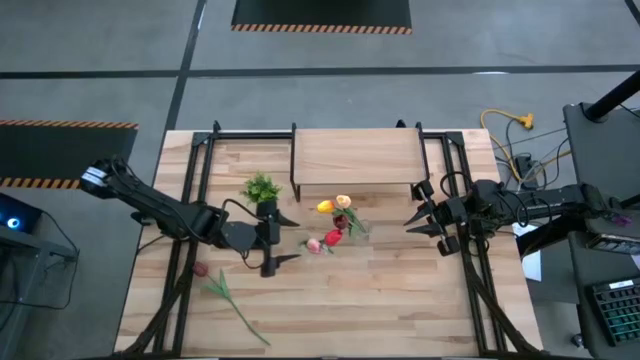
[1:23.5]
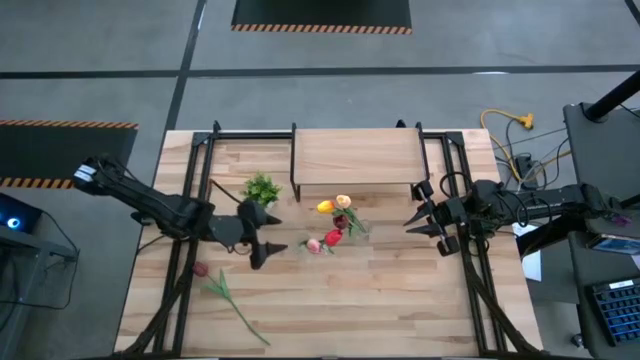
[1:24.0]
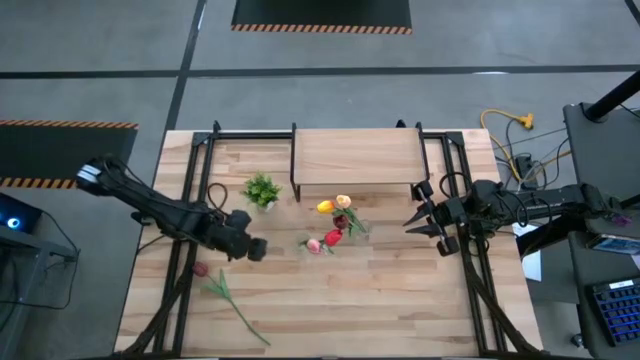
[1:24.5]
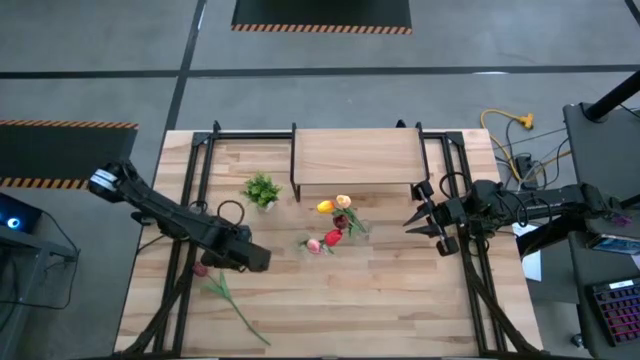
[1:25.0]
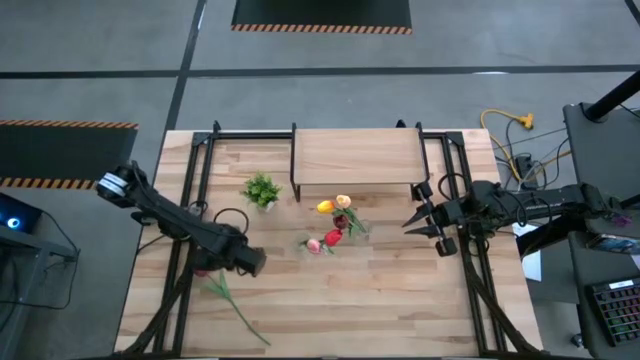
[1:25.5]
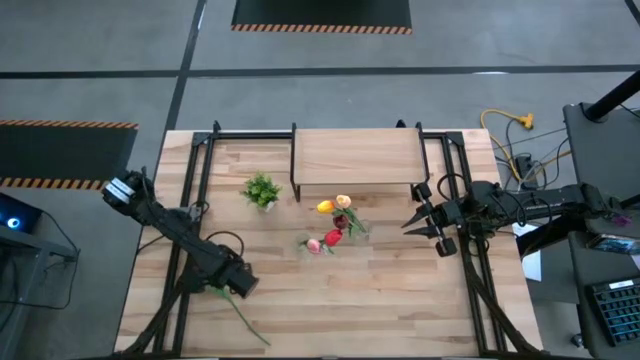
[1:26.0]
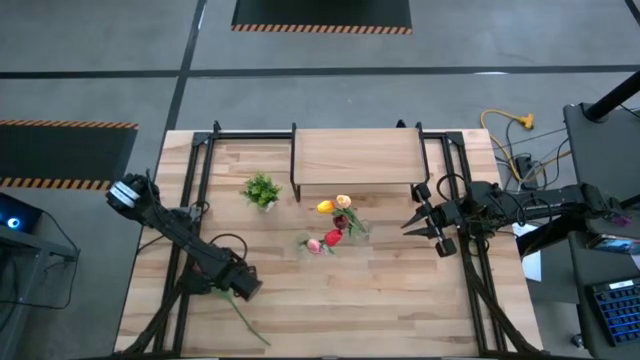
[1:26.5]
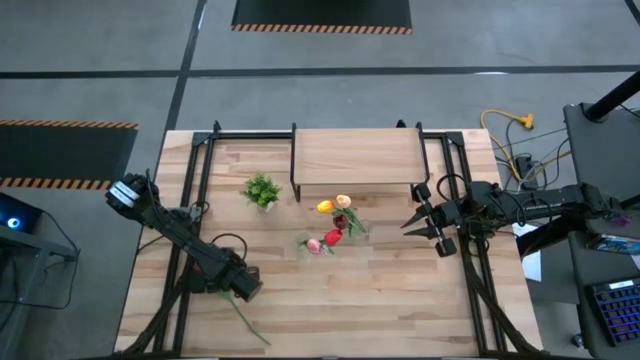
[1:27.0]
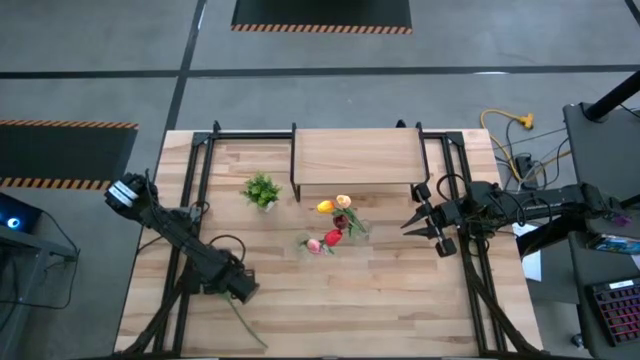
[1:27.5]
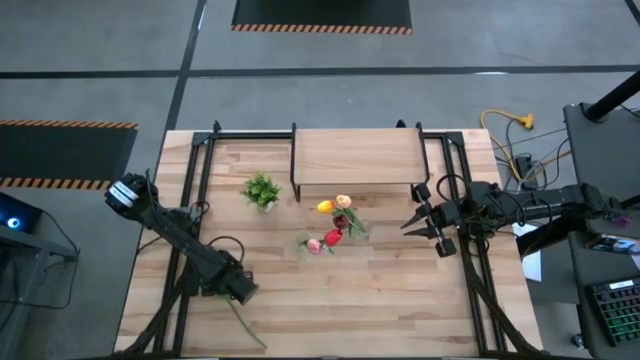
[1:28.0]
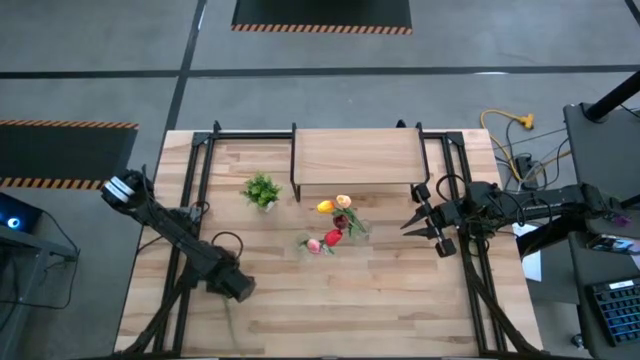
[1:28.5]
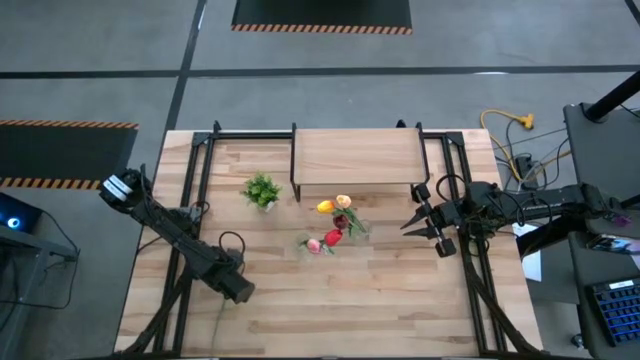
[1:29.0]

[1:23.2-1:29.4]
Task: Pick and place flowers into a vace then onto a shelf
Put the dark red tulip into the left transparent vase

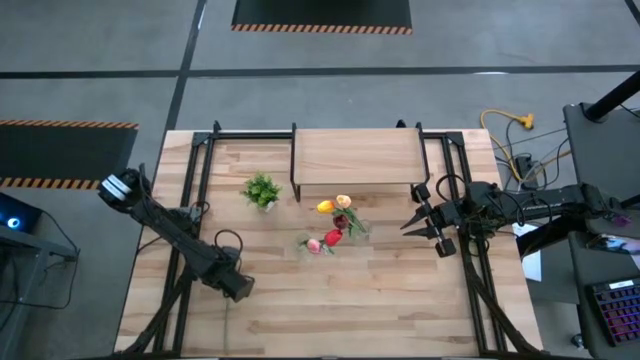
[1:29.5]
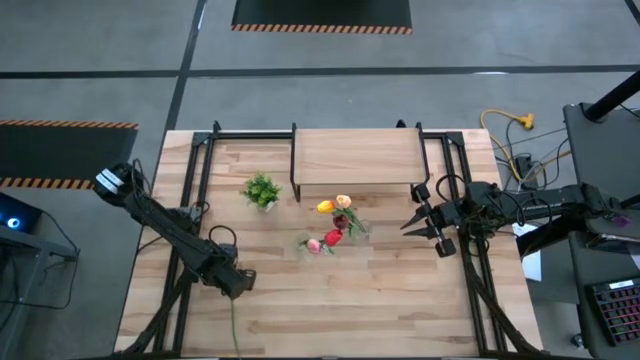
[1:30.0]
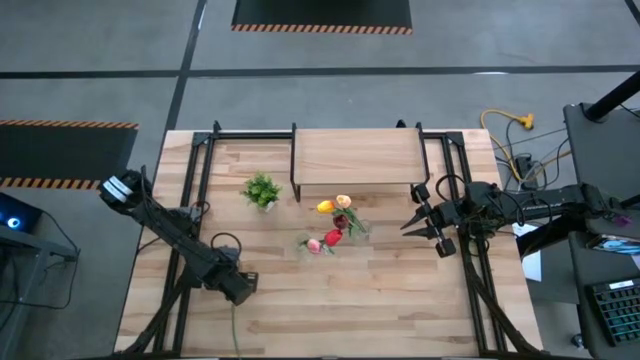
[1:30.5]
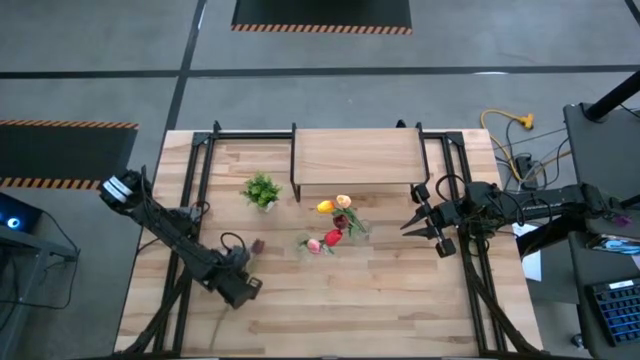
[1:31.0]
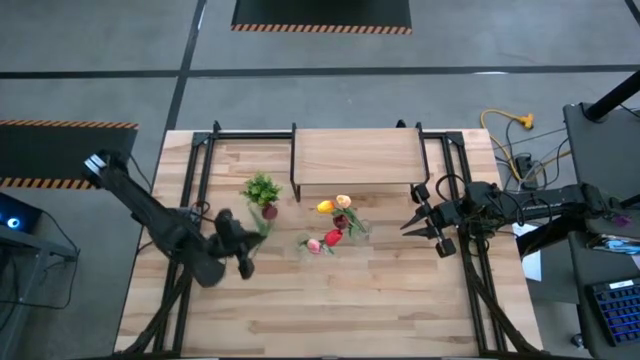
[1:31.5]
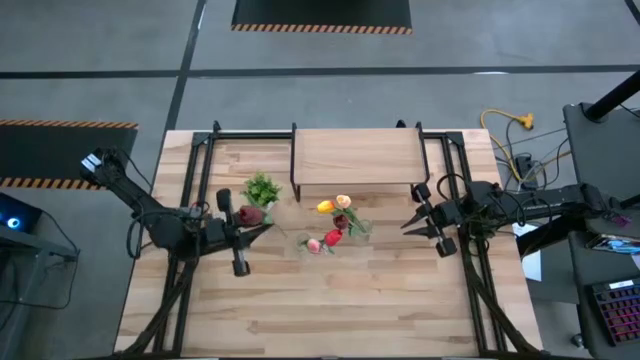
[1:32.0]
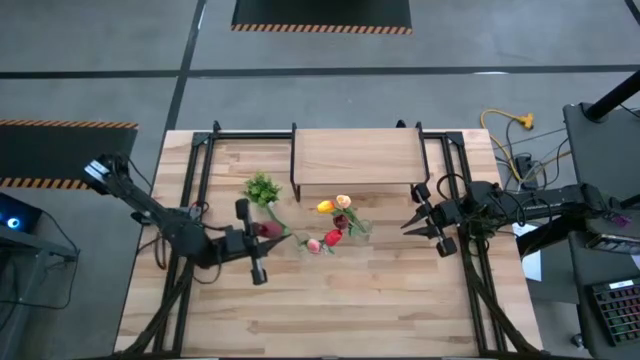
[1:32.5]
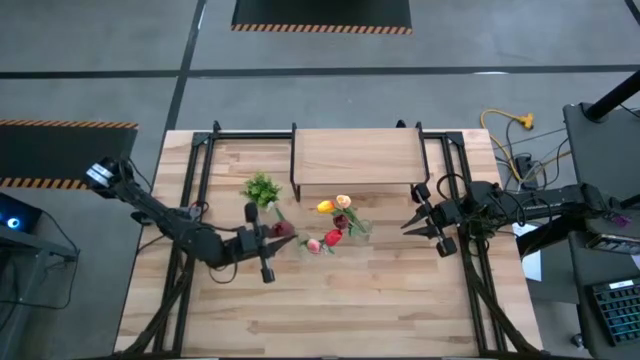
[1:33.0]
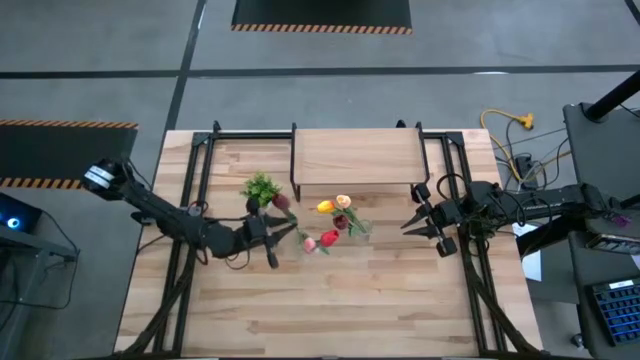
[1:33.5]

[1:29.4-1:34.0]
Put the dark red tulip into the left transparent vase

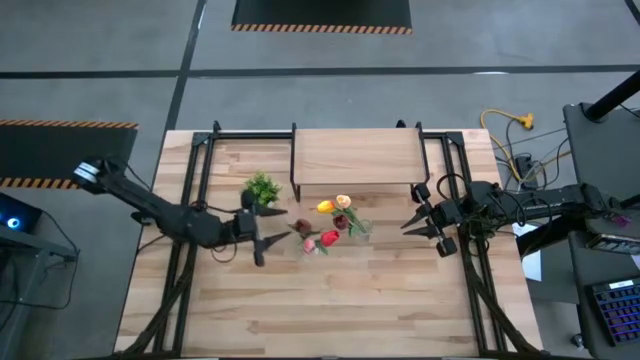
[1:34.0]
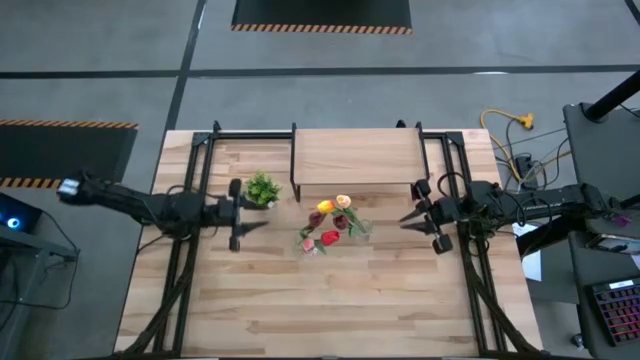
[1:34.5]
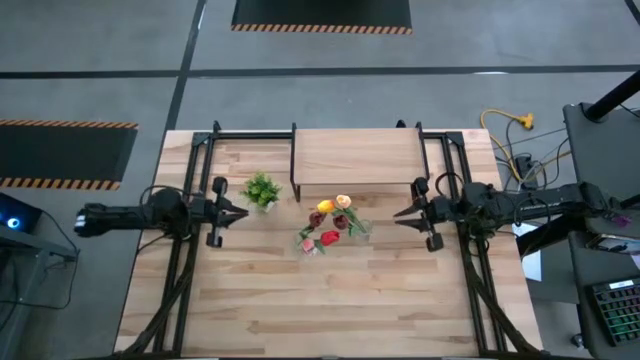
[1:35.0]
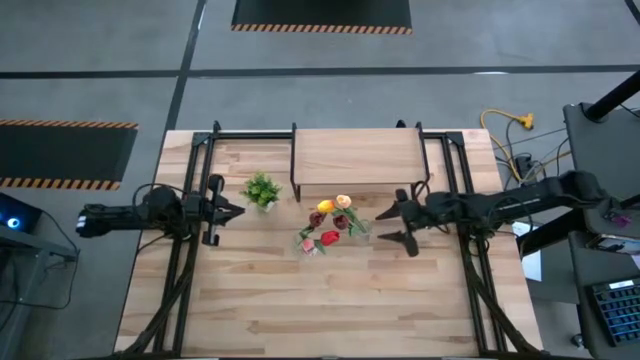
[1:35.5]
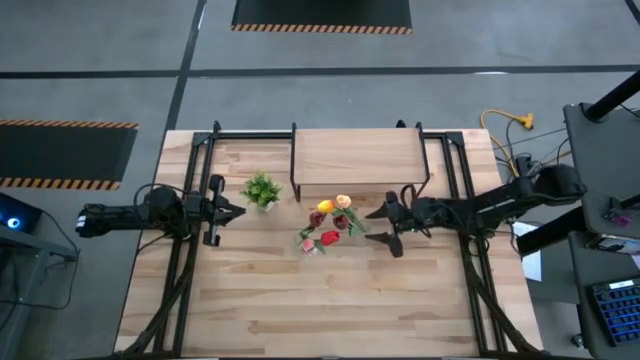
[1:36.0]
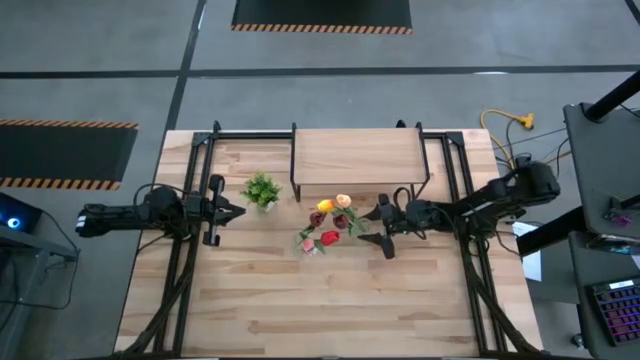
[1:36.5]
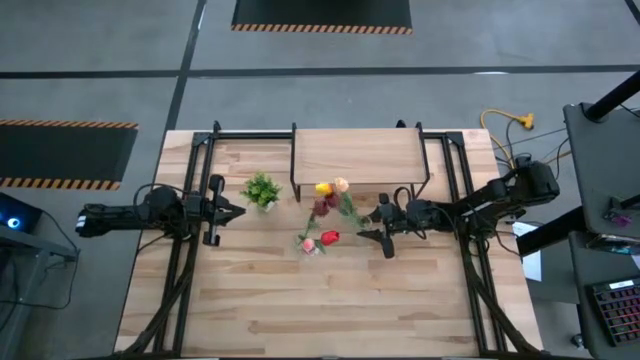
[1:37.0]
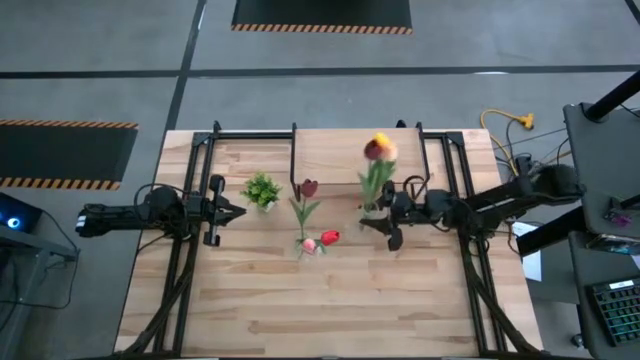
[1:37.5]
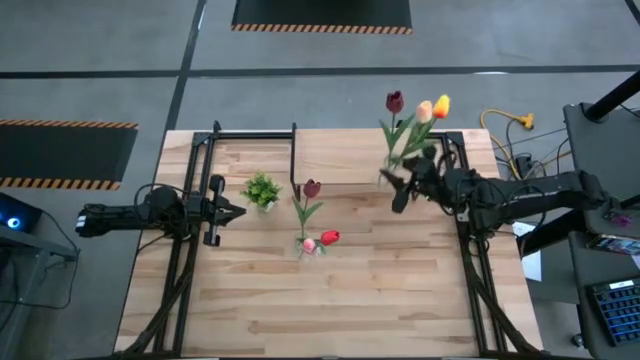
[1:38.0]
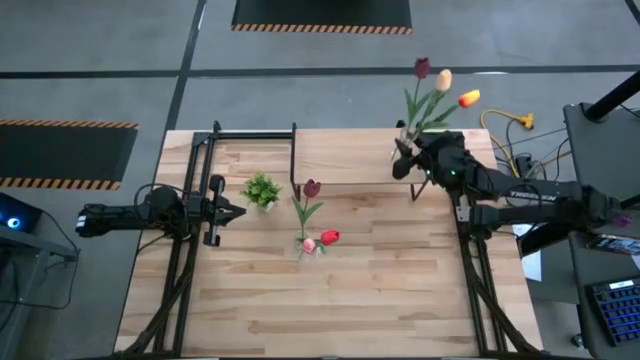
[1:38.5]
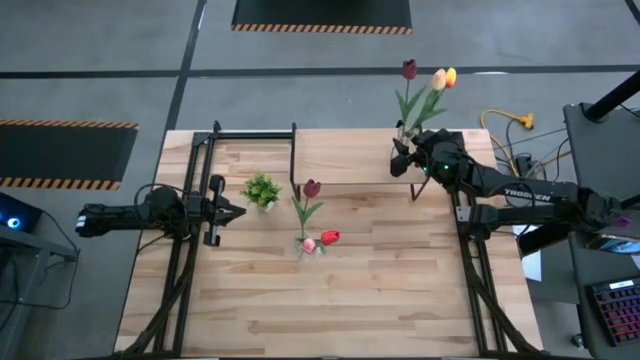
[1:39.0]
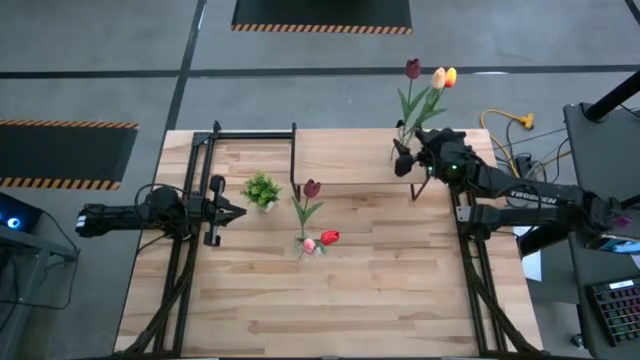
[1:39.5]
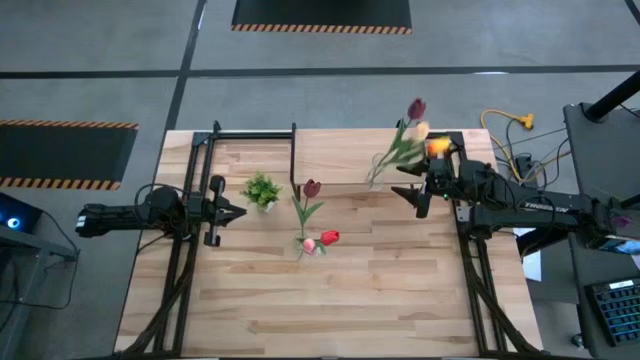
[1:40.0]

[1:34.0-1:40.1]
Put the right transparent vase on the shelf

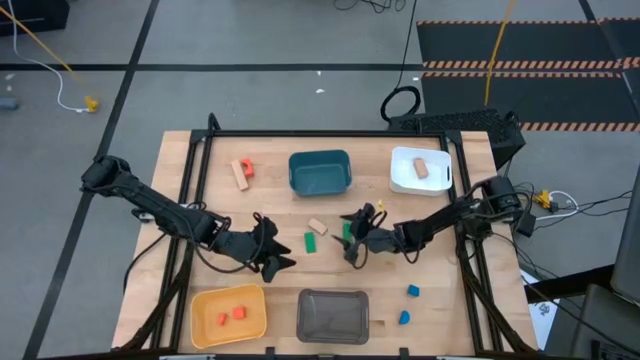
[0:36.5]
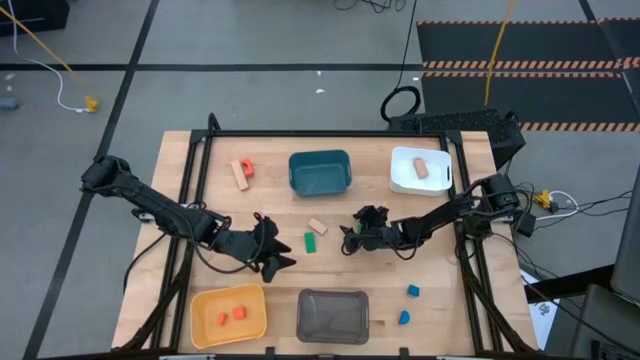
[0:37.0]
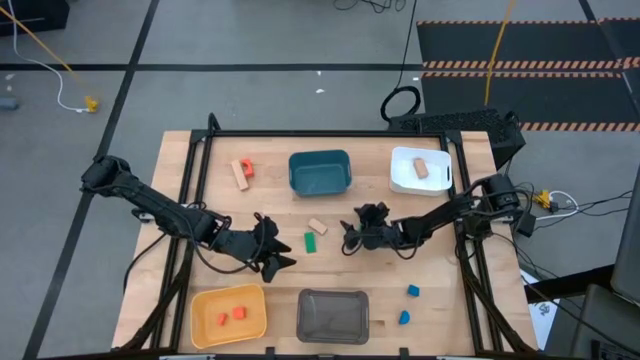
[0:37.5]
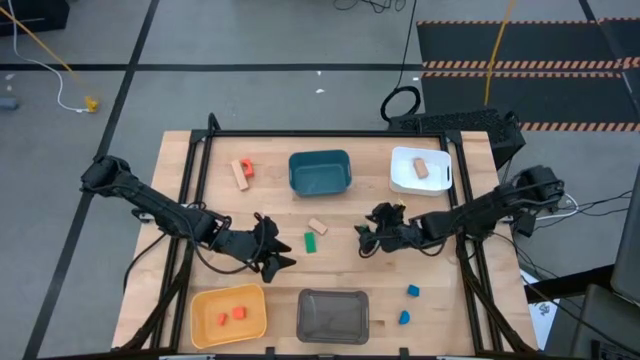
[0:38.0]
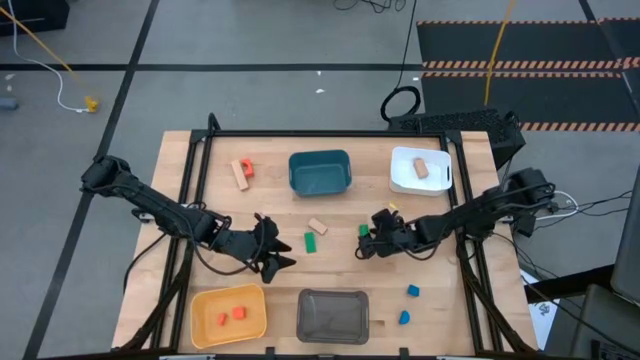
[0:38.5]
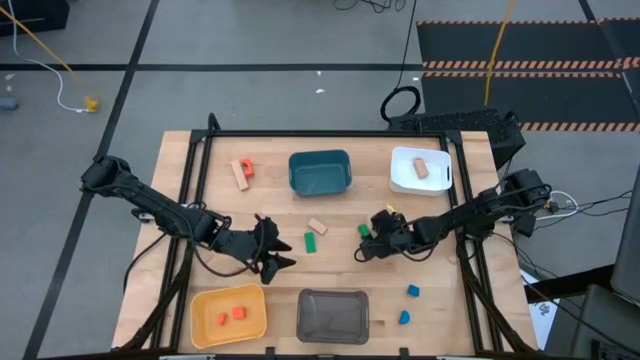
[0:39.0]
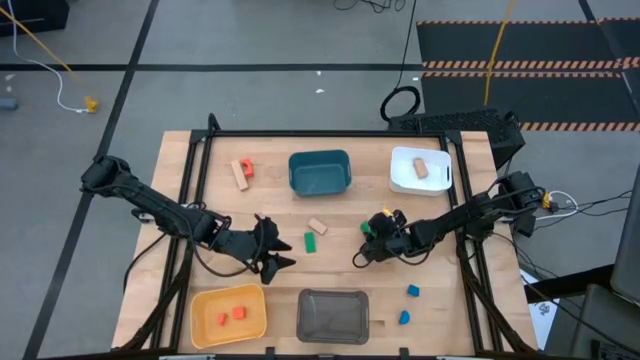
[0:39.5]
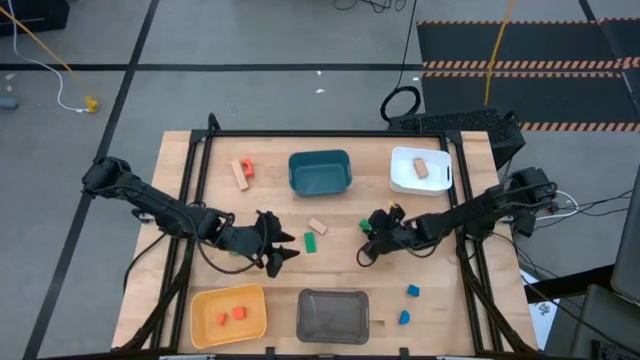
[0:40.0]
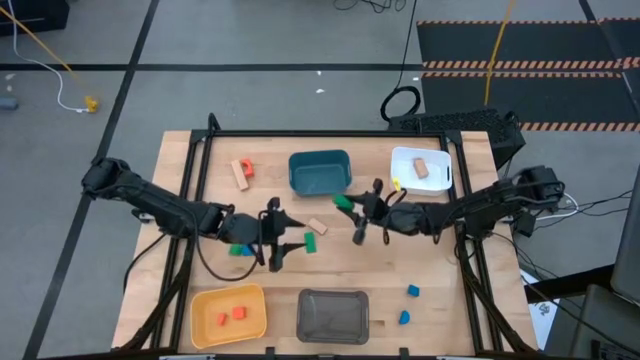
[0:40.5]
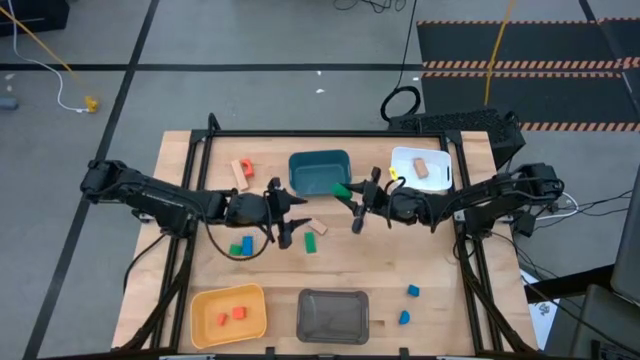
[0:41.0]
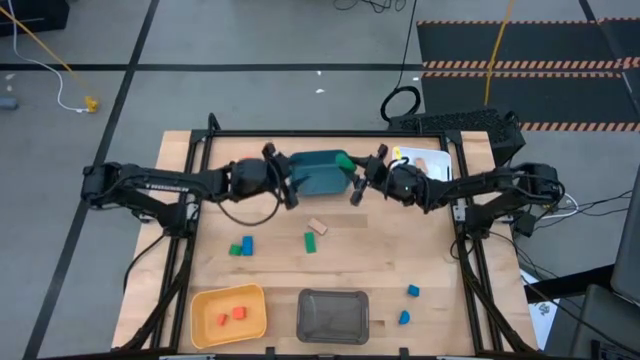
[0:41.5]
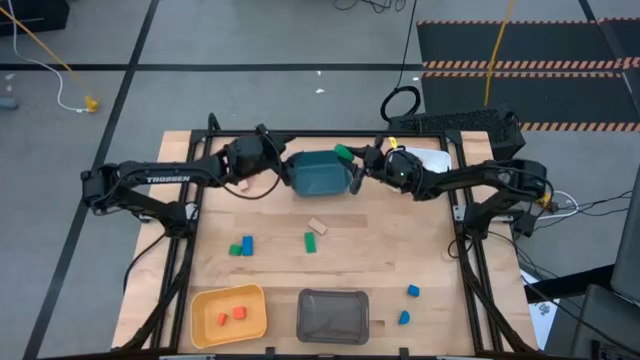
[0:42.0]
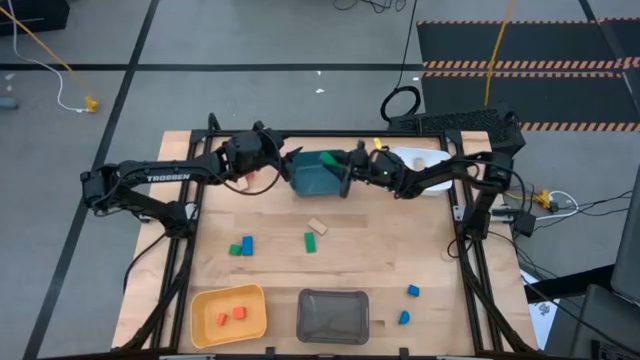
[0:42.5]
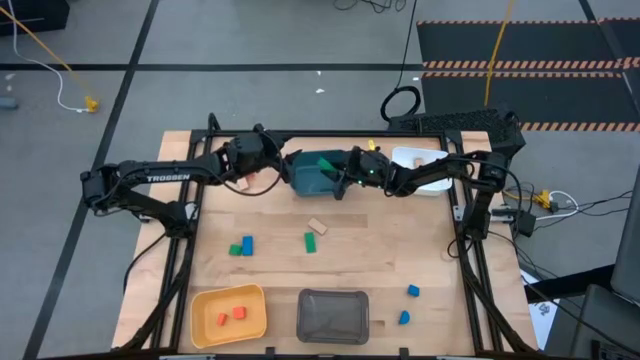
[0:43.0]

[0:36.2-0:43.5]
Task: Sort & place blocks by color
Put the right green block into the blue bin
